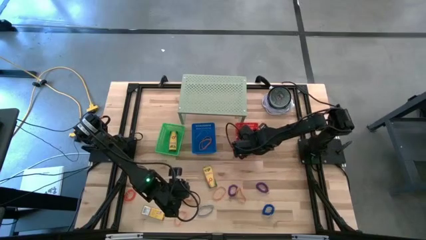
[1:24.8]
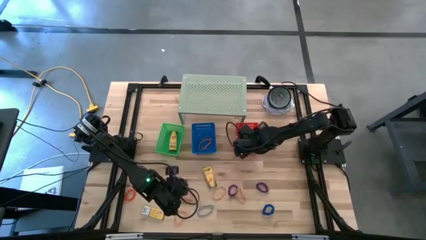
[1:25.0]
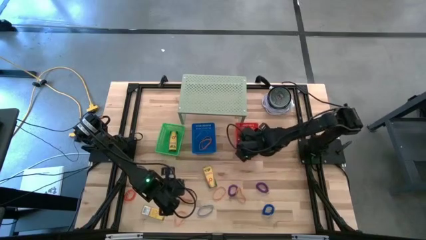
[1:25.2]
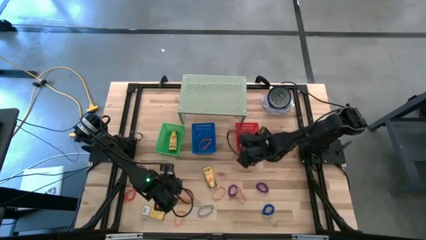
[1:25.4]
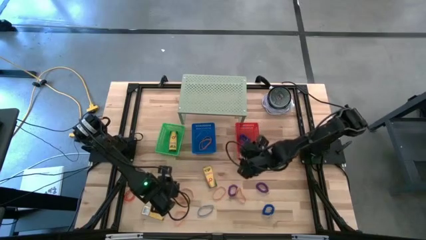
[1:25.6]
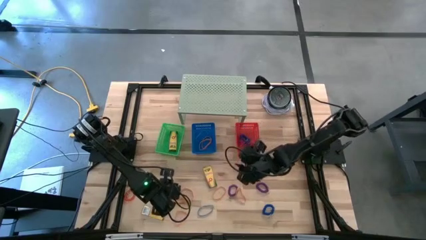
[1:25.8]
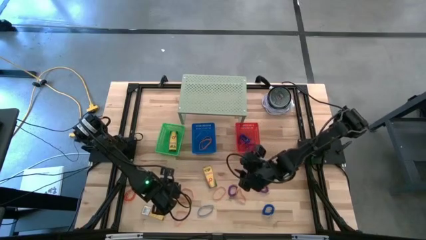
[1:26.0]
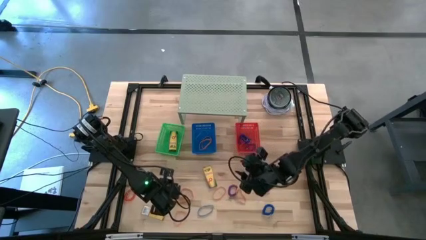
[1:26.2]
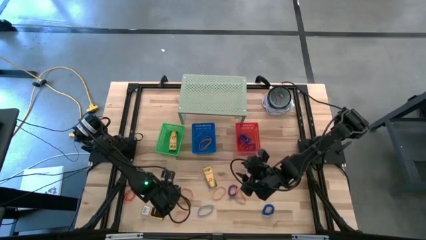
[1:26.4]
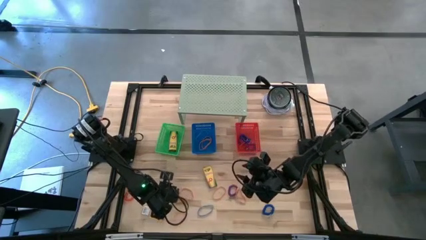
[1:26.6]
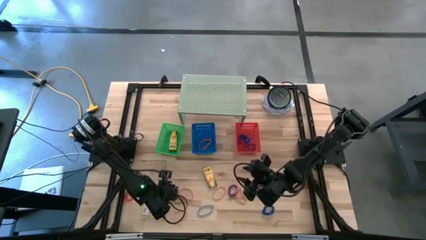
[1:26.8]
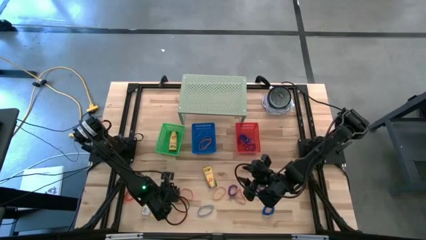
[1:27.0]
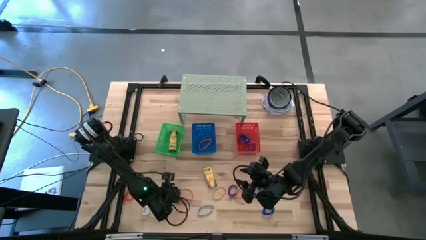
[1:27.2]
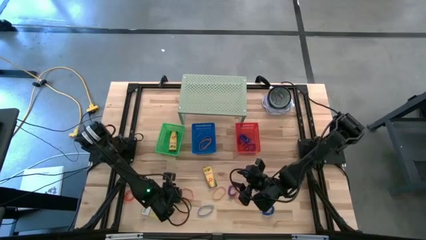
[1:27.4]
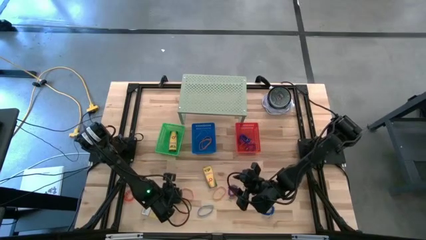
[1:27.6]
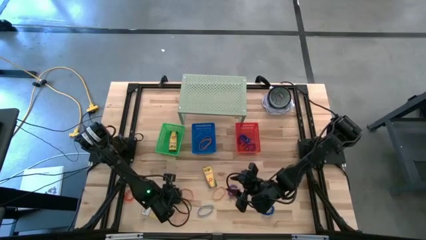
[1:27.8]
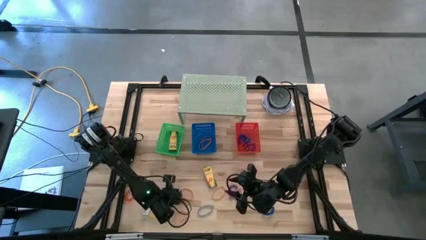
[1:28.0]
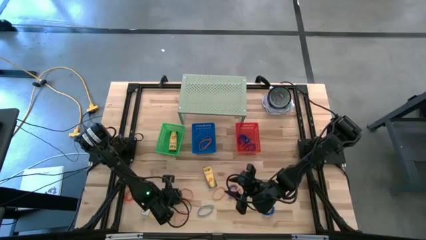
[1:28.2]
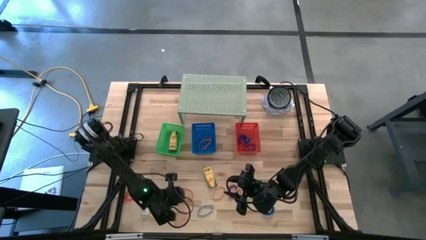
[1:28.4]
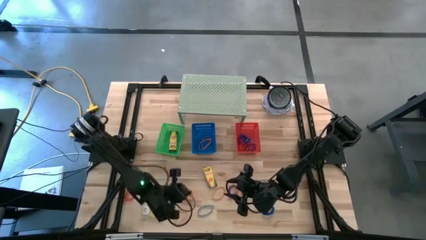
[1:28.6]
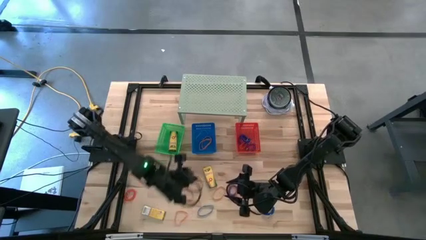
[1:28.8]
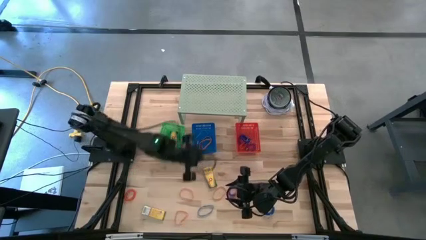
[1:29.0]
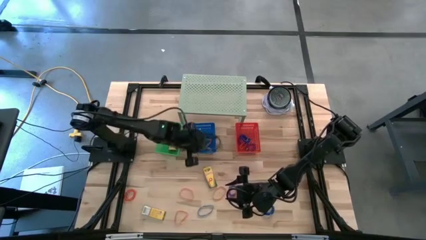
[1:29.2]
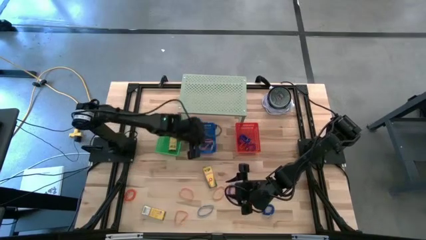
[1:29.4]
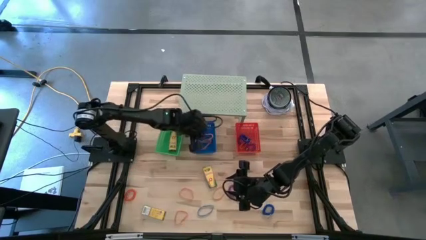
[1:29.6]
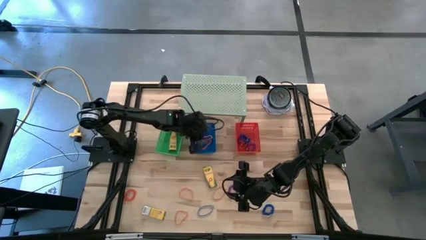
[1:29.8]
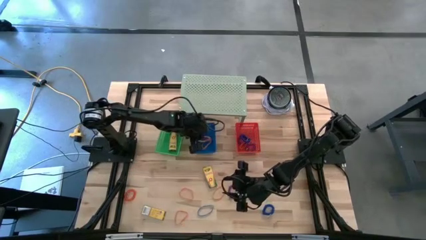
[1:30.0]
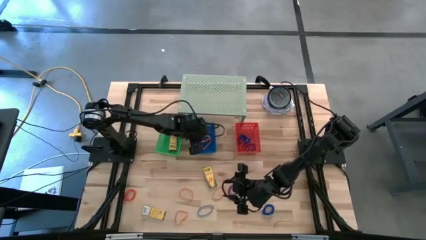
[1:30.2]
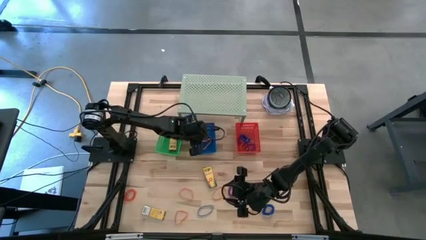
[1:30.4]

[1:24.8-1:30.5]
Task: Pick & Place Office Desk Supplies
Put the orange rubber band into the blue bin

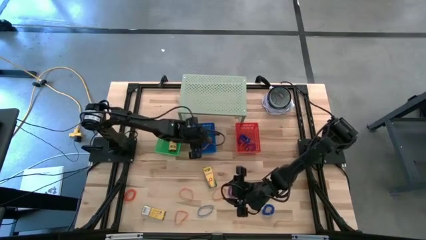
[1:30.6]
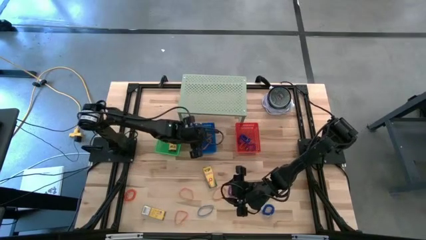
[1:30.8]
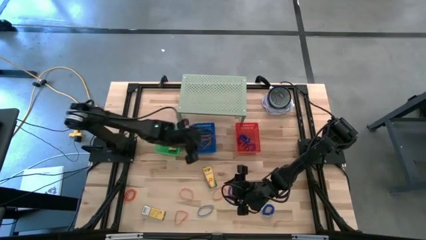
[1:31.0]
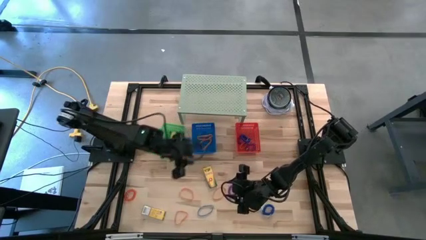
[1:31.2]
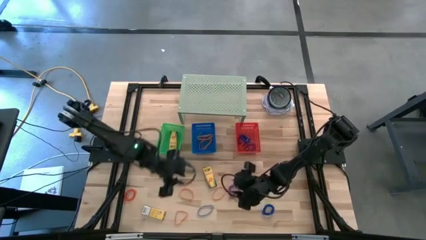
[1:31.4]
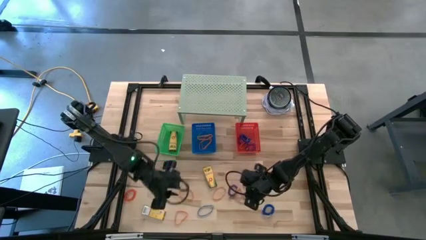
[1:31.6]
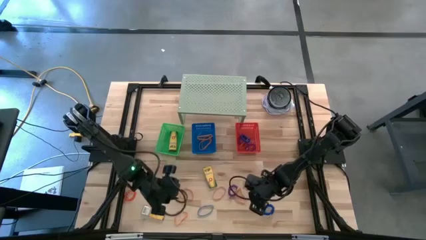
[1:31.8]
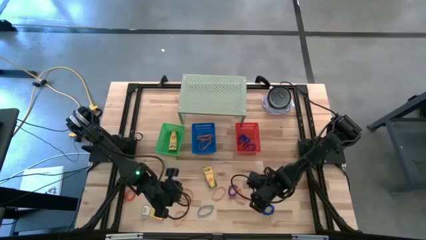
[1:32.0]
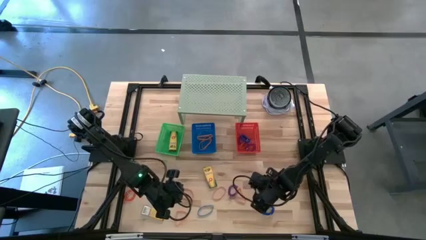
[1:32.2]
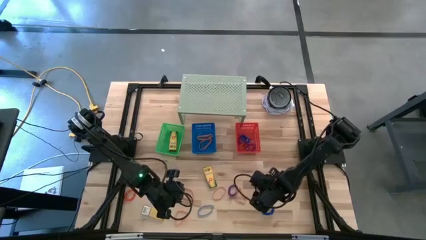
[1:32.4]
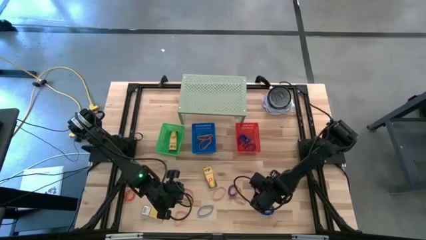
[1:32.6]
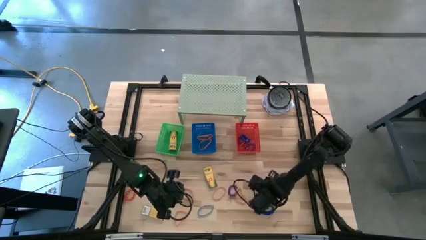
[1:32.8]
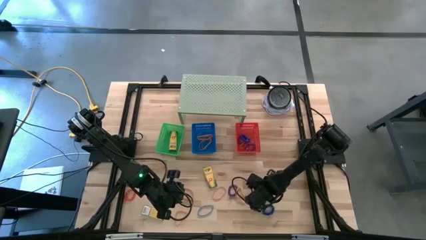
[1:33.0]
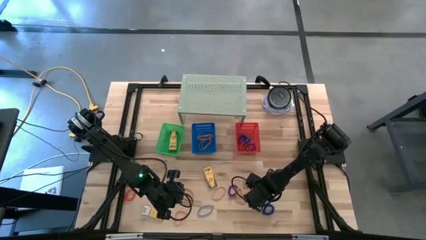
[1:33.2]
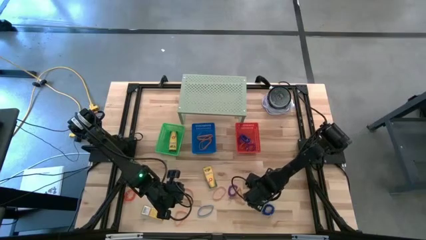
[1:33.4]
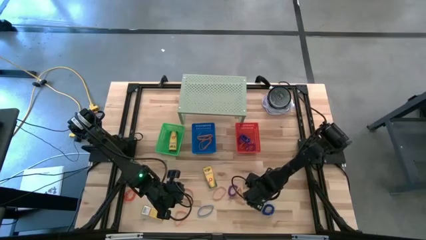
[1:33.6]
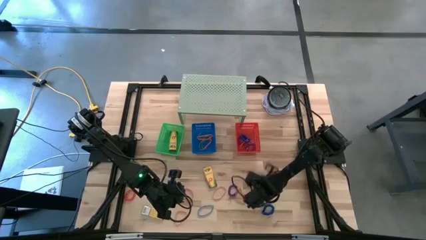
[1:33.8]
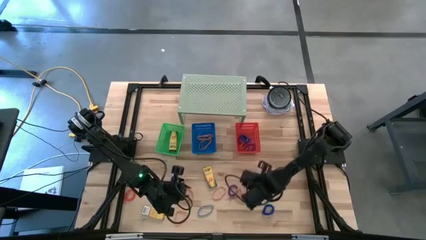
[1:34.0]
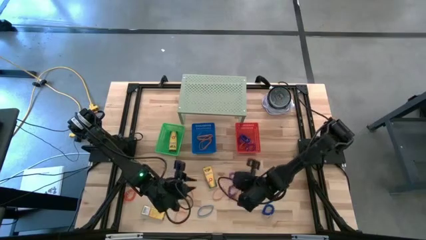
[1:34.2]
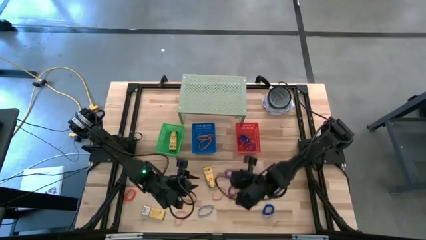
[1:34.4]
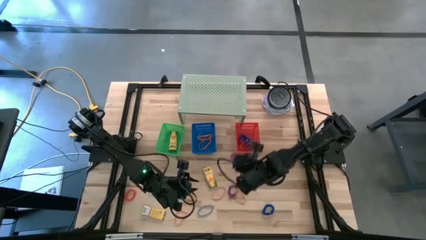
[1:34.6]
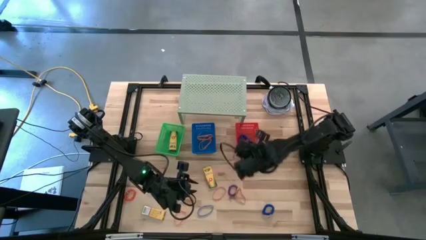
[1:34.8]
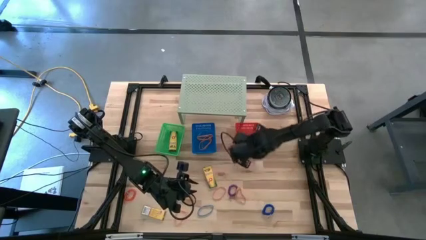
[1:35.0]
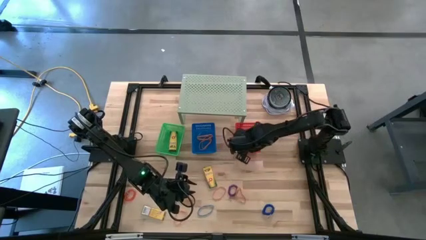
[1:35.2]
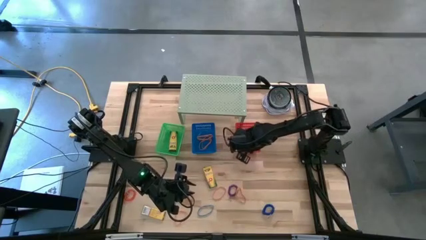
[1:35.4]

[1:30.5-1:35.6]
Put the purple spring keychain into the red bin

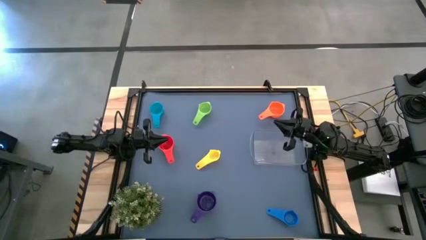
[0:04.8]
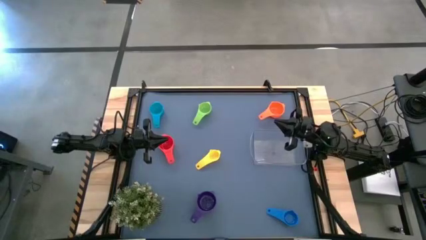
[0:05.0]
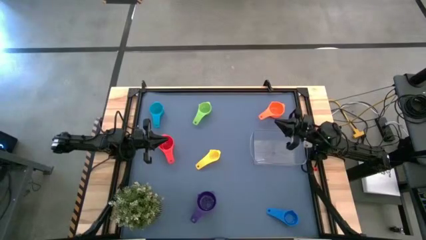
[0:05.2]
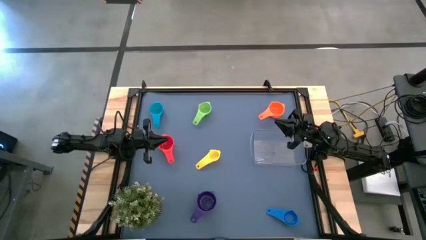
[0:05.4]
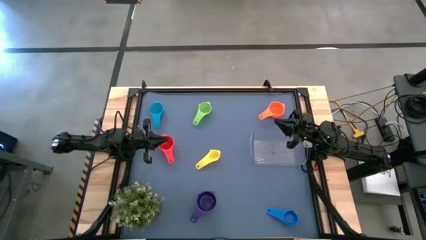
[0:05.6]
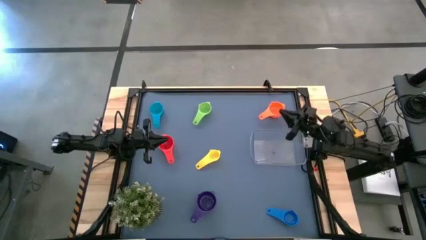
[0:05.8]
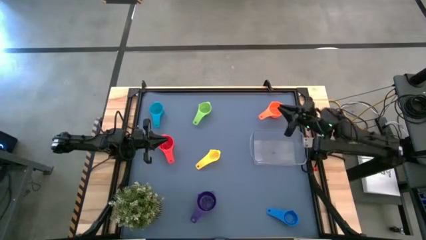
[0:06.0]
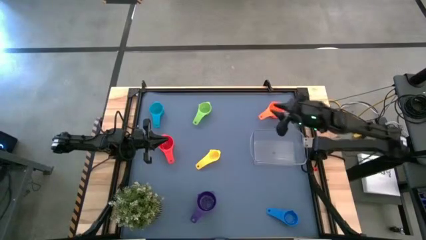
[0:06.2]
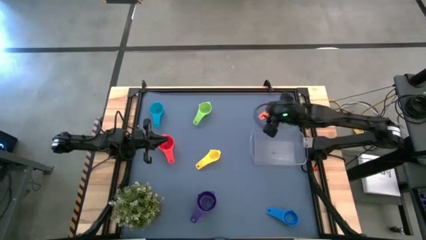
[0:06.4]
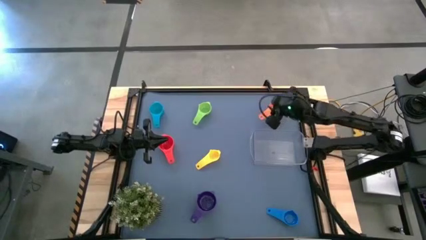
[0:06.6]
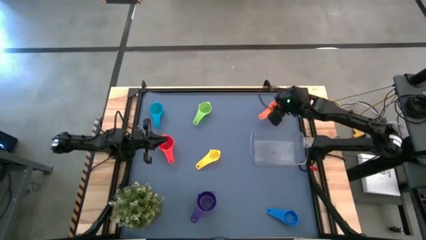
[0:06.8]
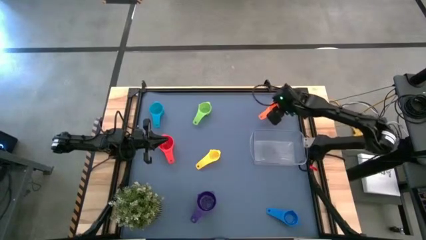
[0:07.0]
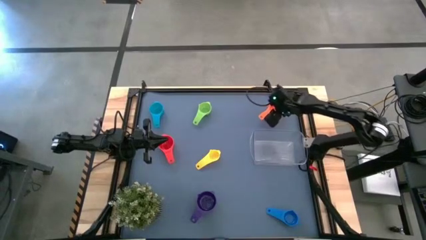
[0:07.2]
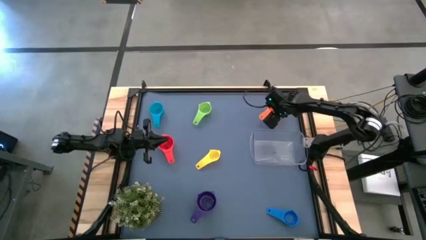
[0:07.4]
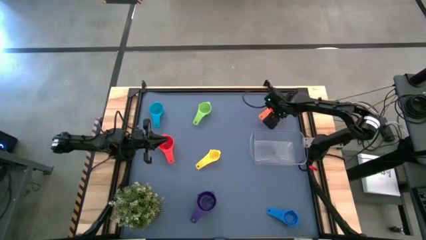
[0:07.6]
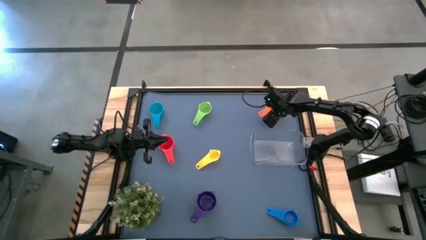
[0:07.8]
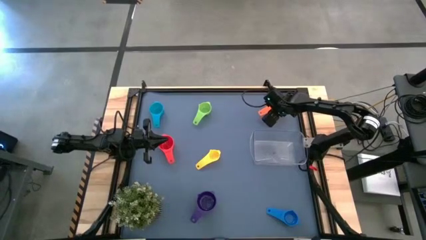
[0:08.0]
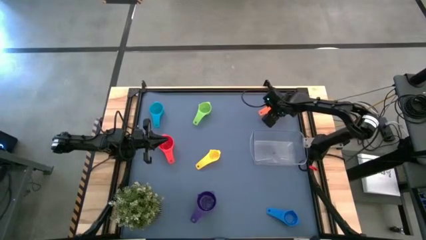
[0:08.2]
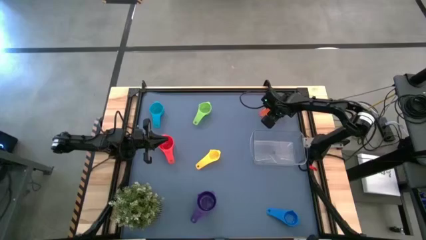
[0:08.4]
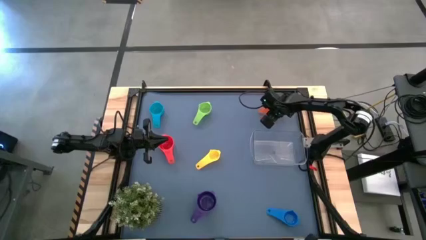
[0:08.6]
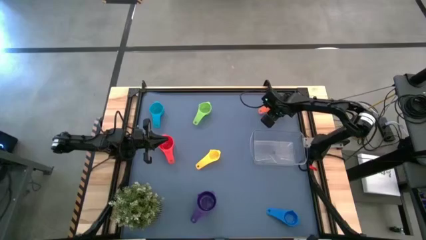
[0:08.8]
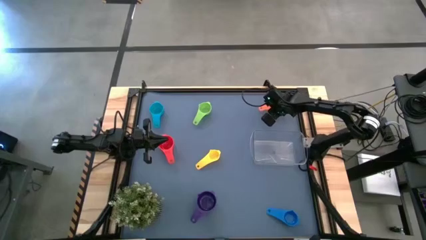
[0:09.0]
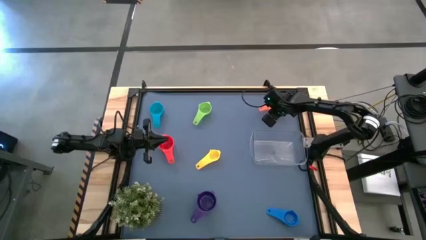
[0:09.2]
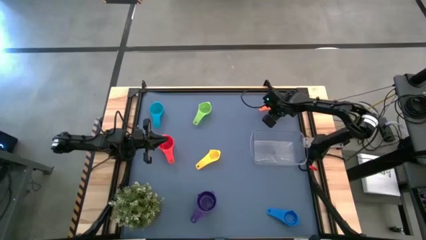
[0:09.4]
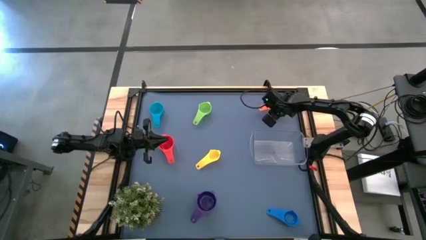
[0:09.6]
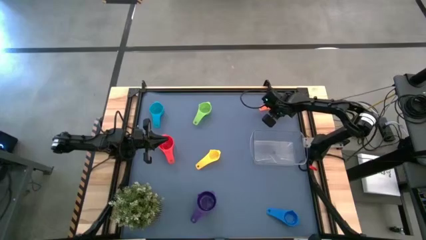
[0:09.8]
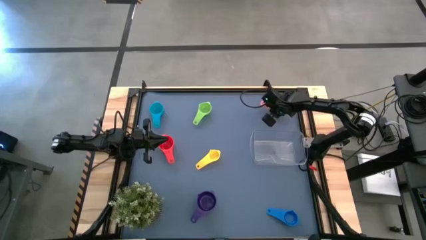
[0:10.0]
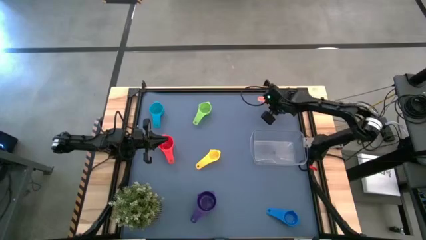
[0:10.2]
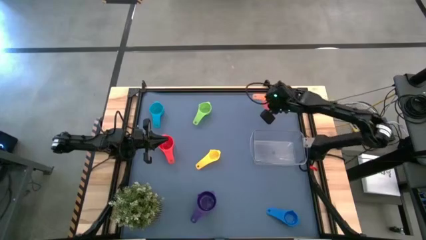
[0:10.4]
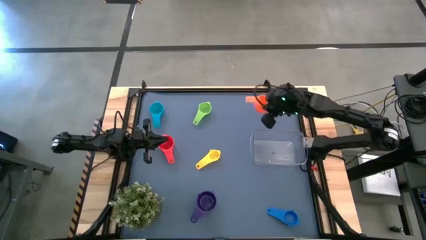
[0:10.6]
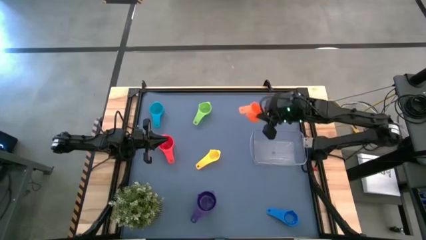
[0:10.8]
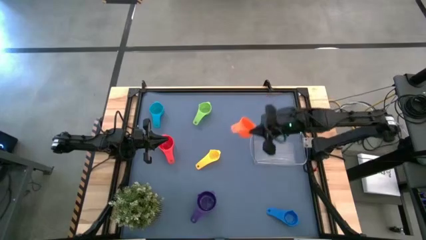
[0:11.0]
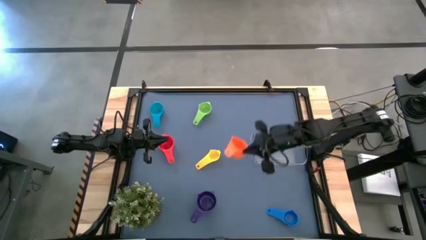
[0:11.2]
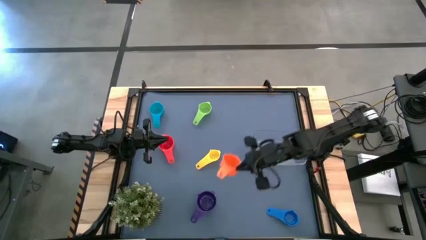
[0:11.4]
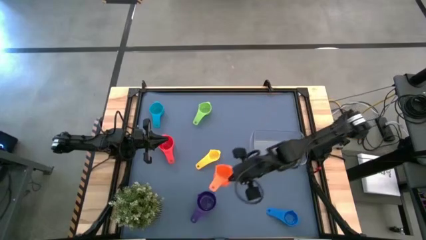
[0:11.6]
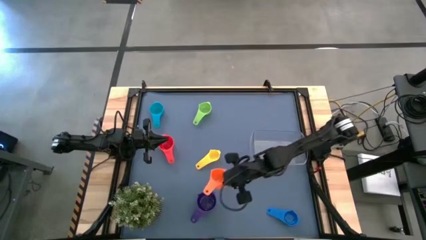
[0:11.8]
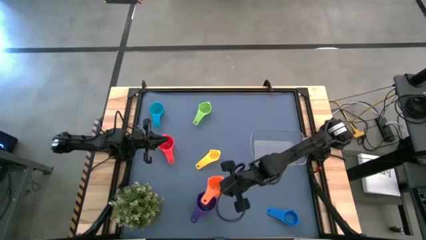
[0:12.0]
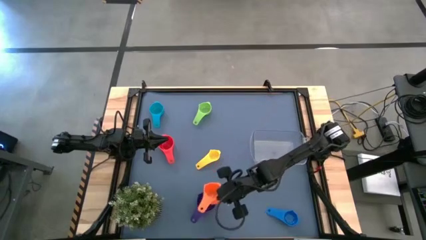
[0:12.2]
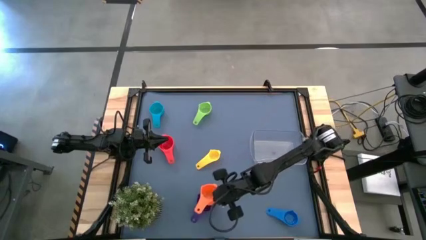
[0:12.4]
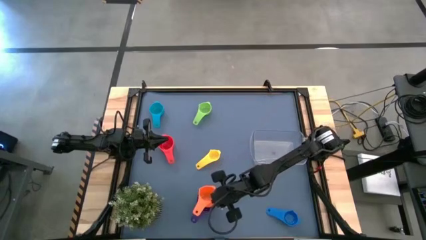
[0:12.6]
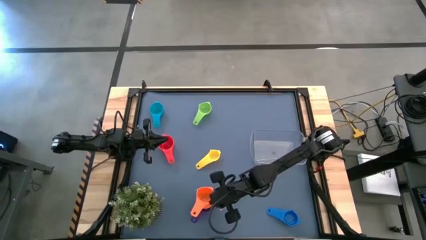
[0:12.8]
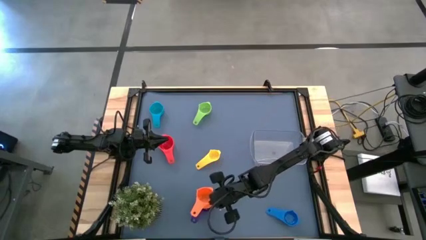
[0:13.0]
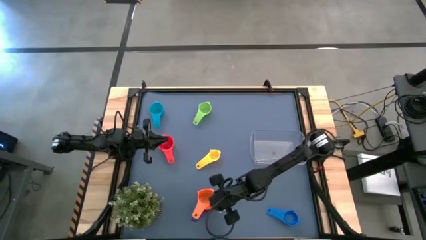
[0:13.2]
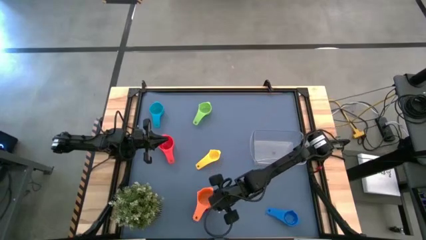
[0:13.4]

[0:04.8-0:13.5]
Task: Nest measuring cups in basket
Stack the orange measuring cup on top of the violet measuring cup
